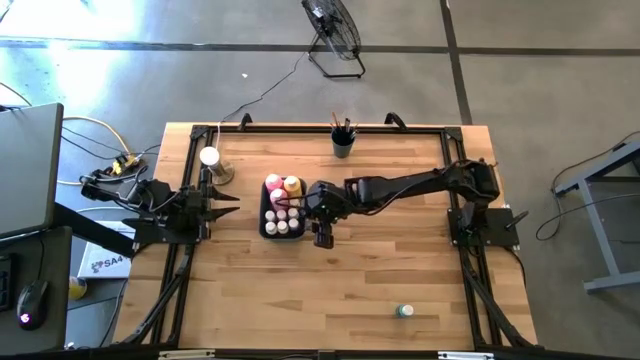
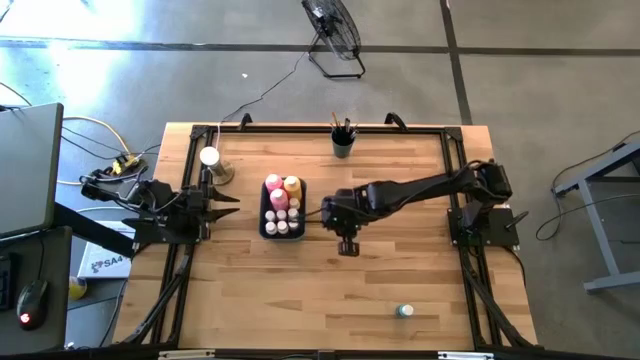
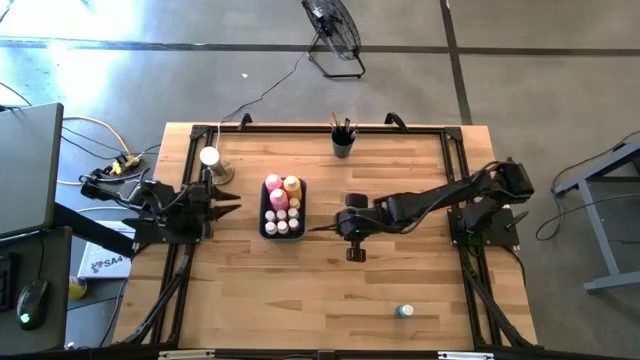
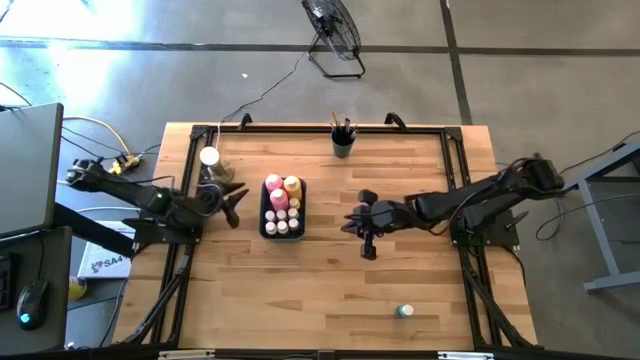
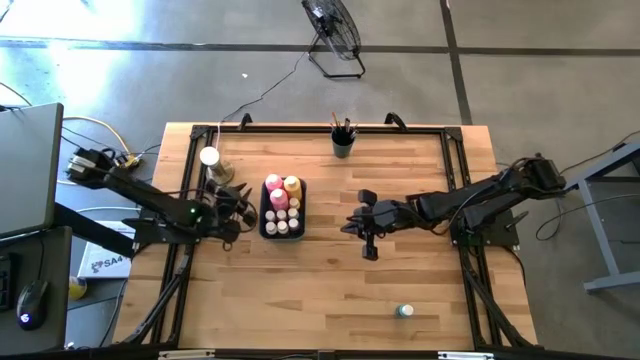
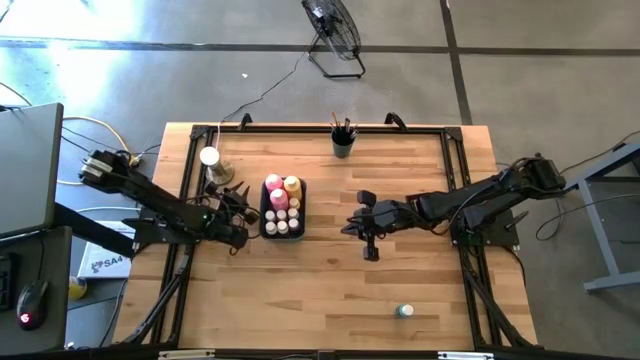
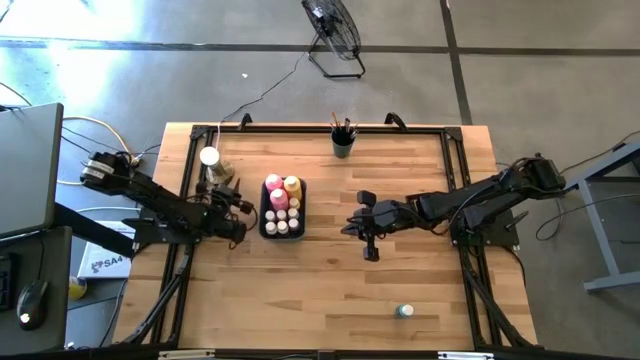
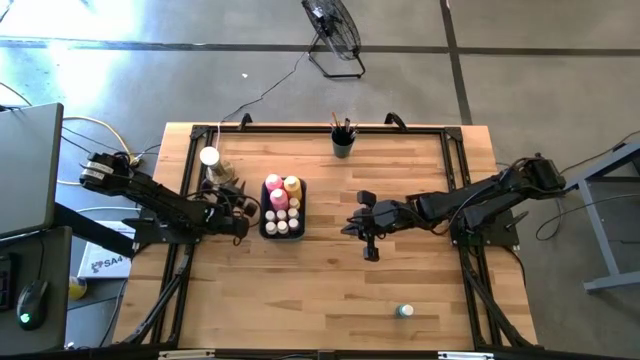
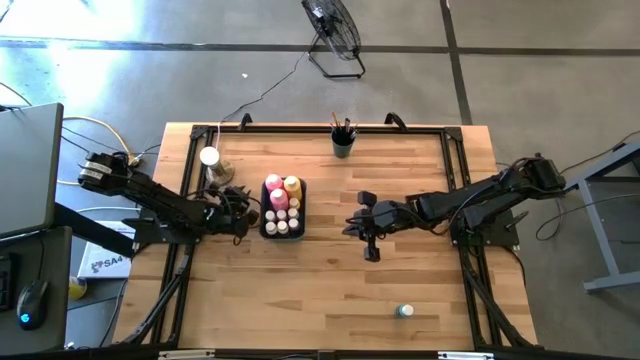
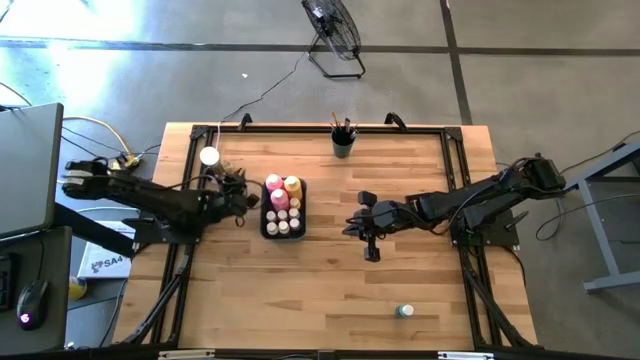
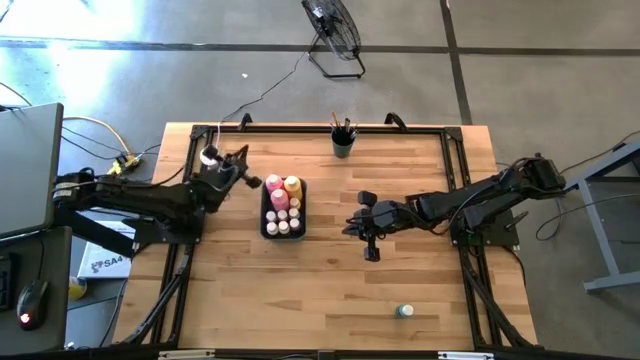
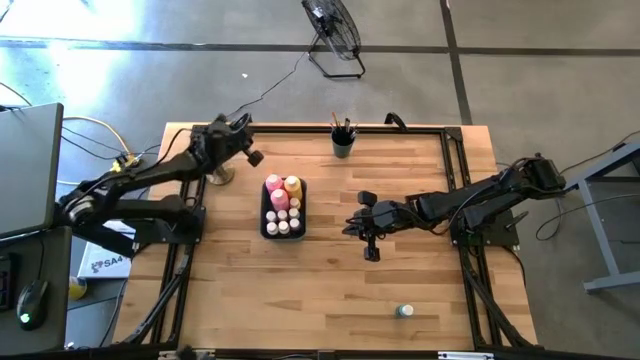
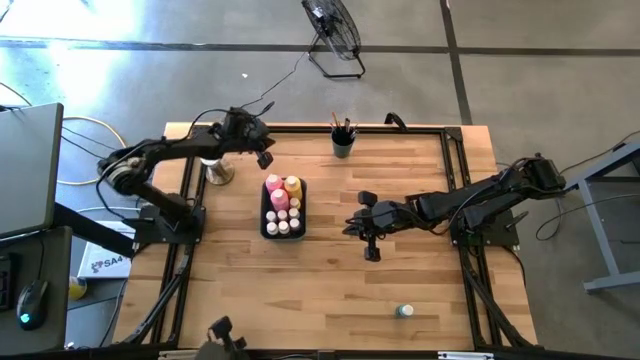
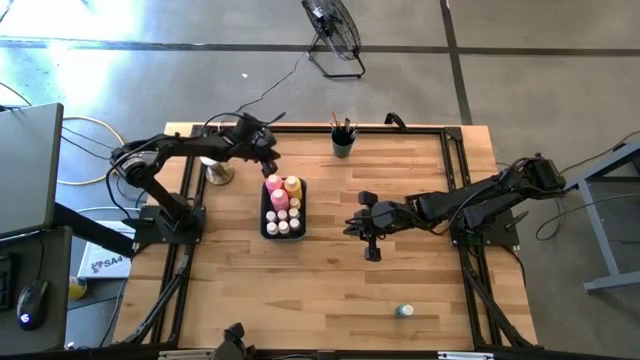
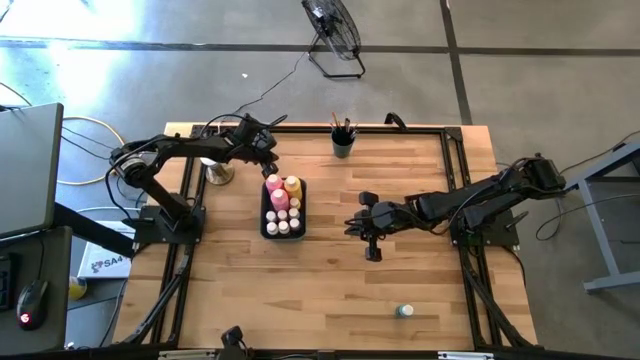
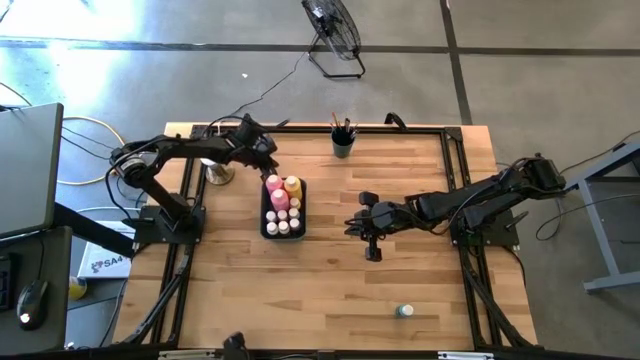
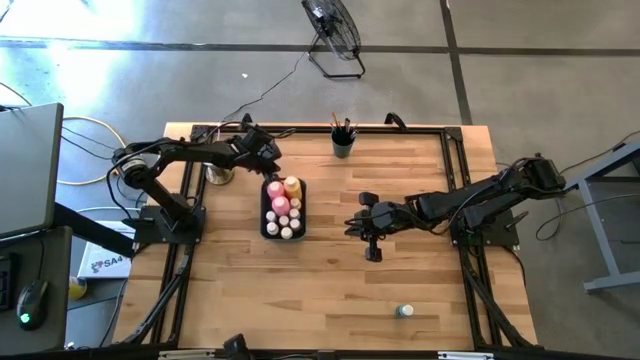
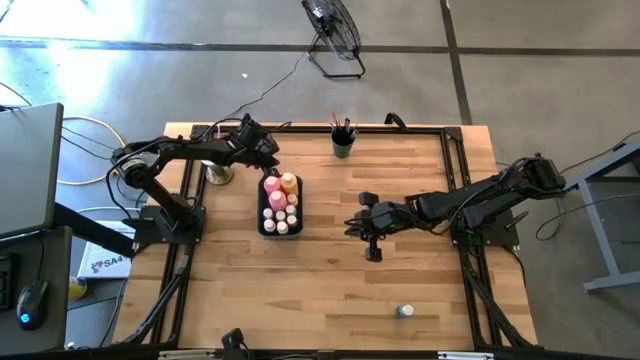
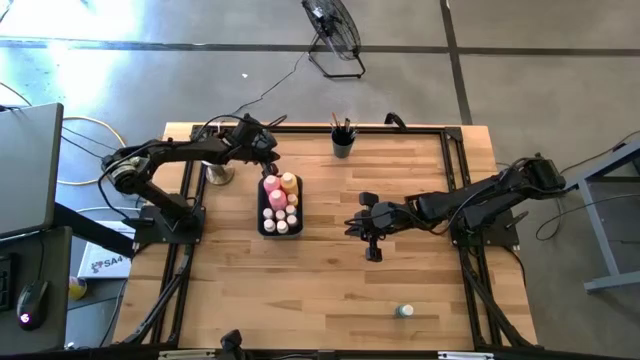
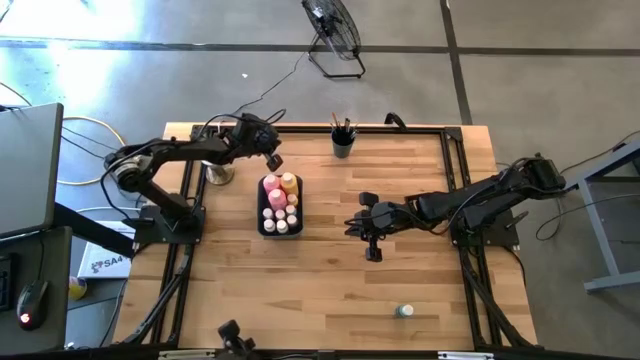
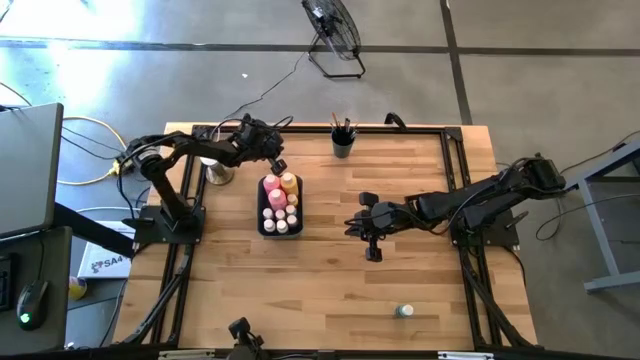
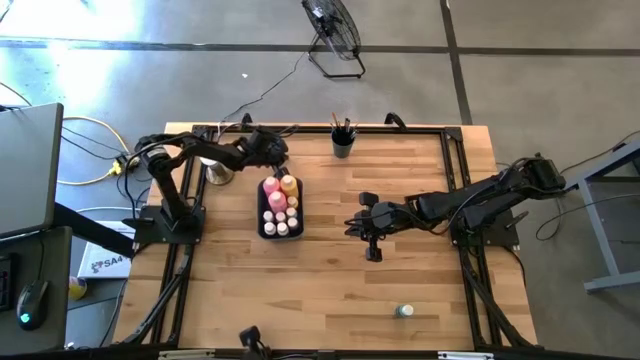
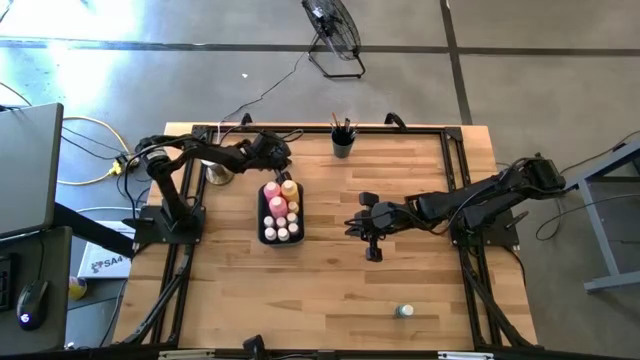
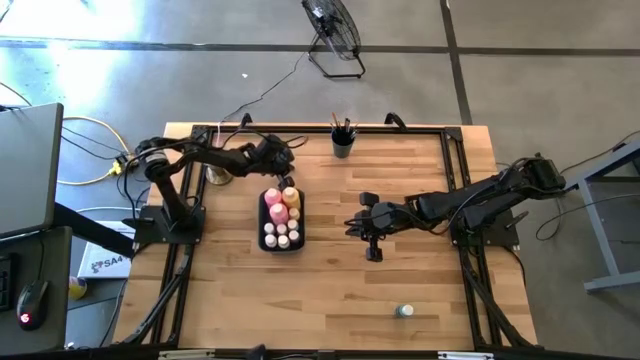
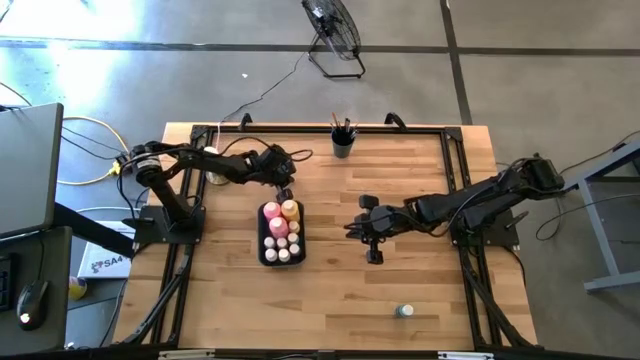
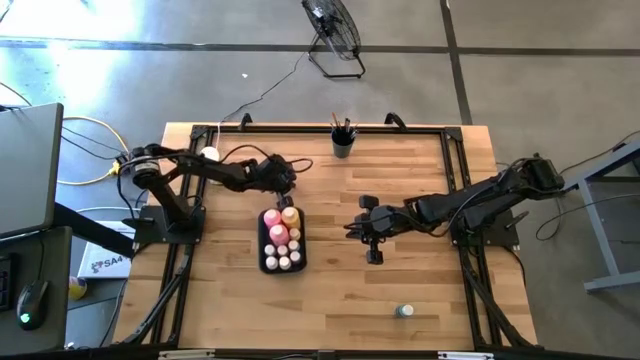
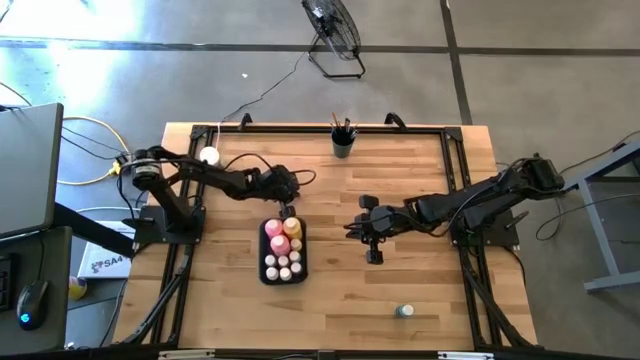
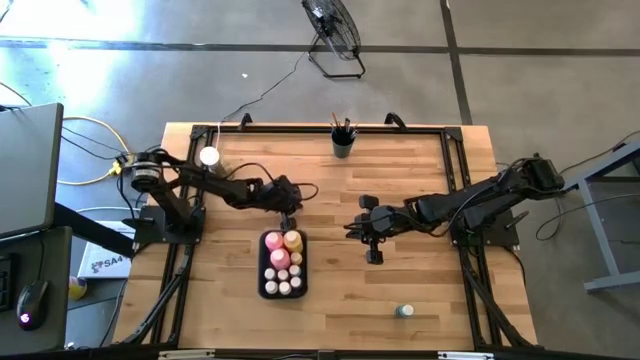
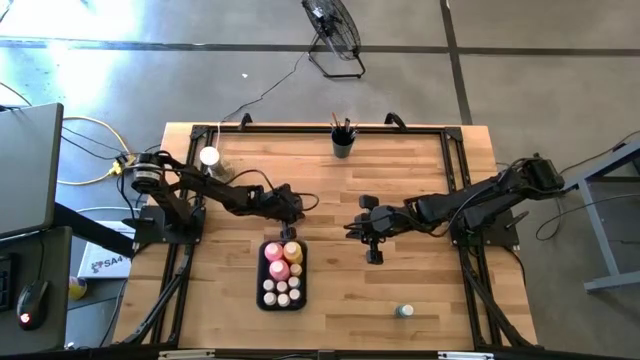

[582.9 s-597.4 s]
Task: Pick & Place Paint Supplies
Move the green bin from middle left to the bottom left of the table
